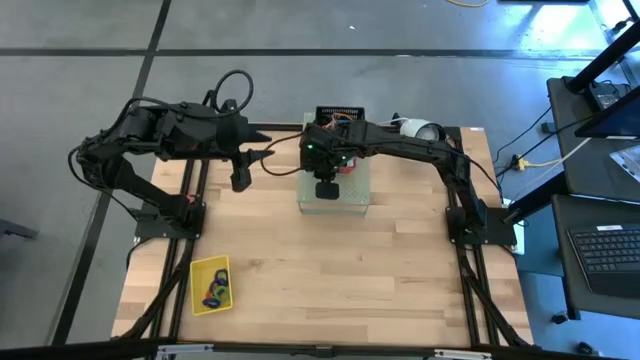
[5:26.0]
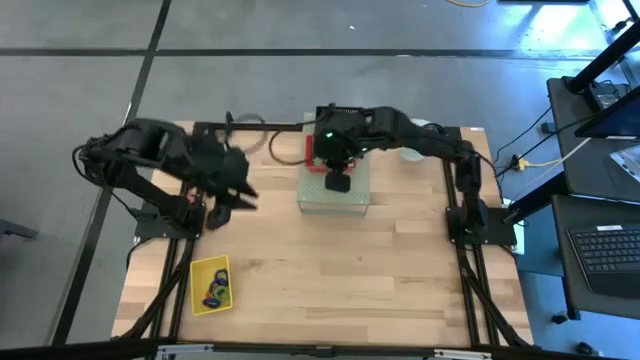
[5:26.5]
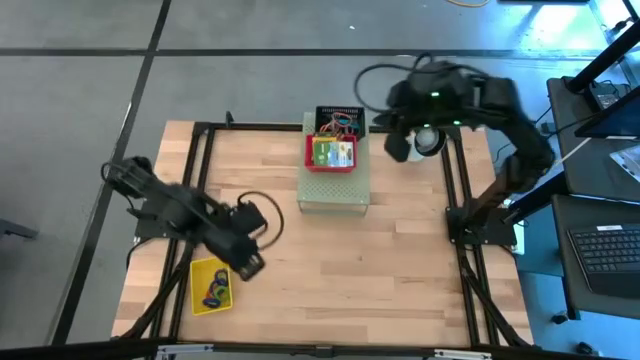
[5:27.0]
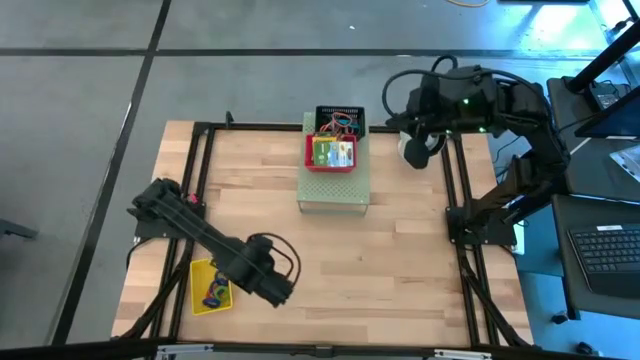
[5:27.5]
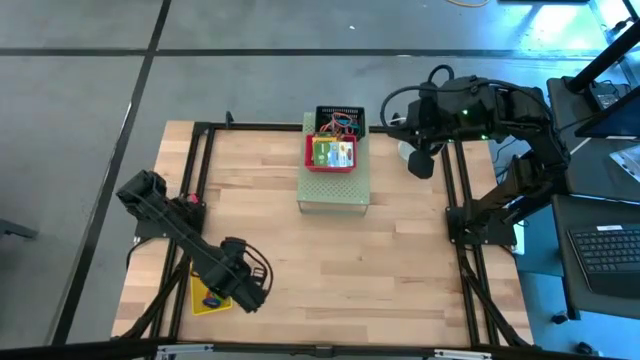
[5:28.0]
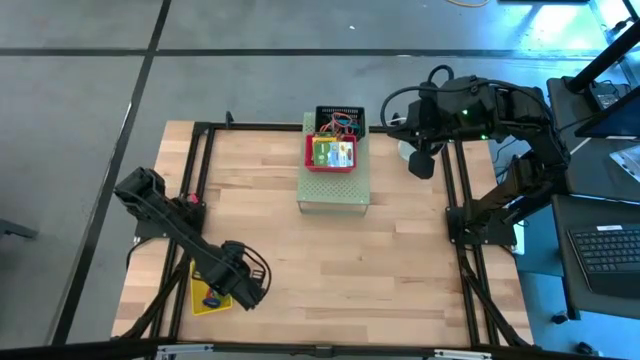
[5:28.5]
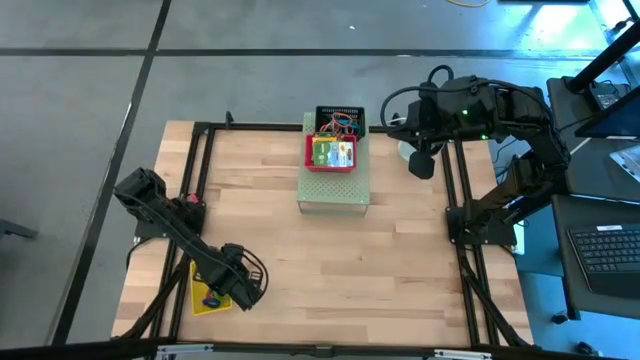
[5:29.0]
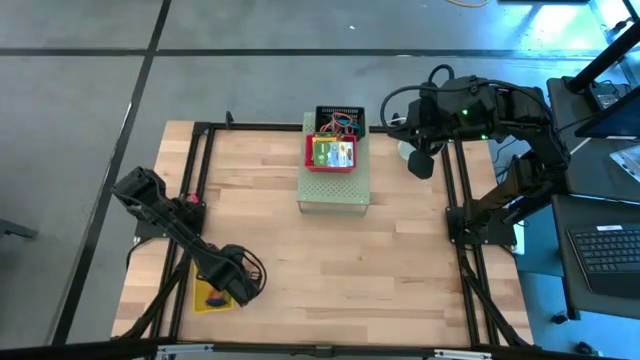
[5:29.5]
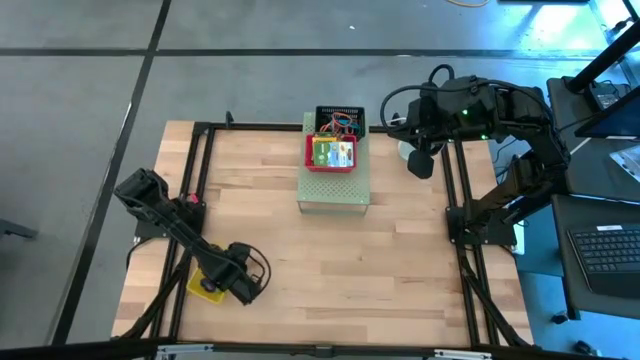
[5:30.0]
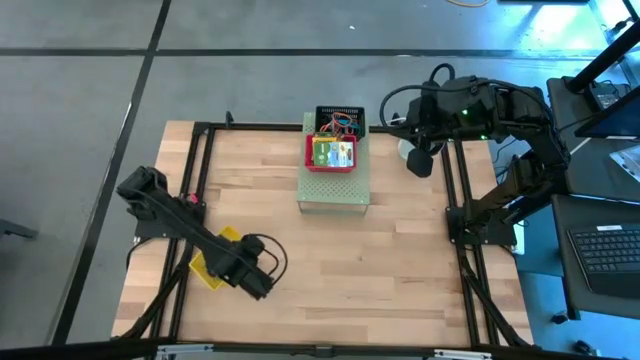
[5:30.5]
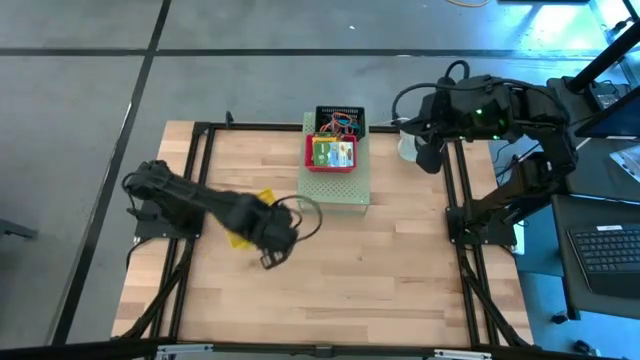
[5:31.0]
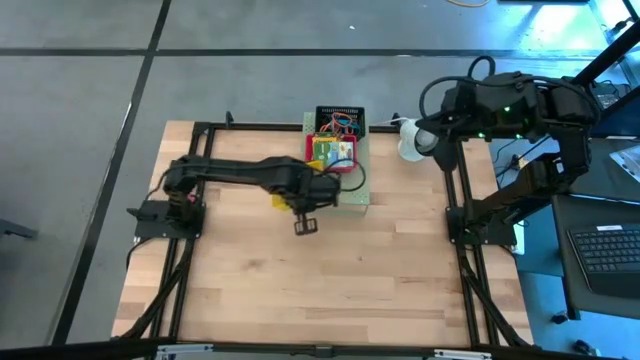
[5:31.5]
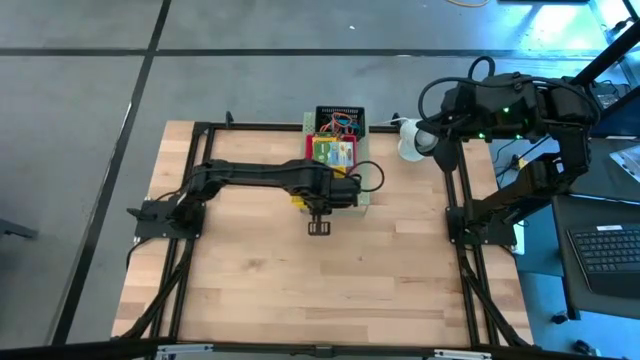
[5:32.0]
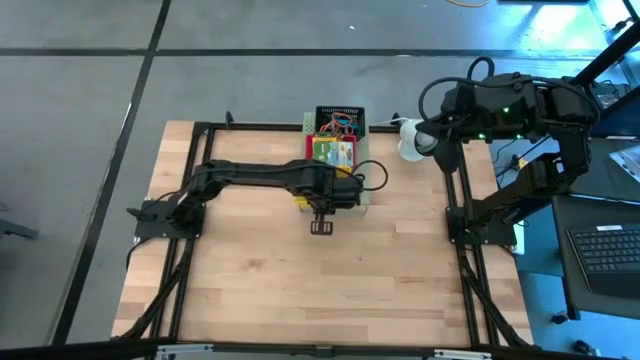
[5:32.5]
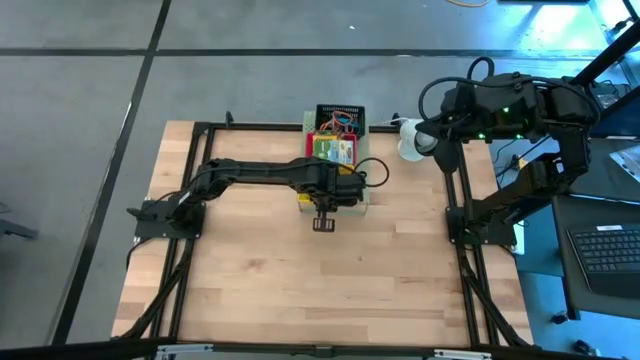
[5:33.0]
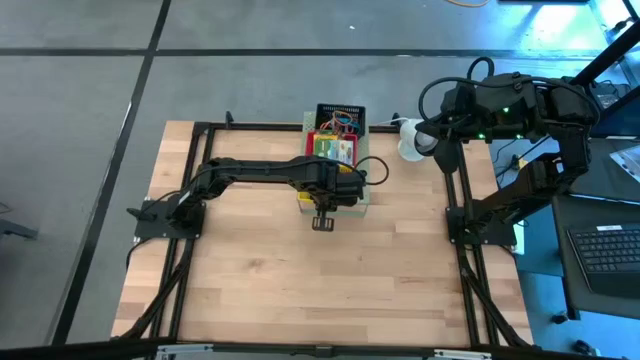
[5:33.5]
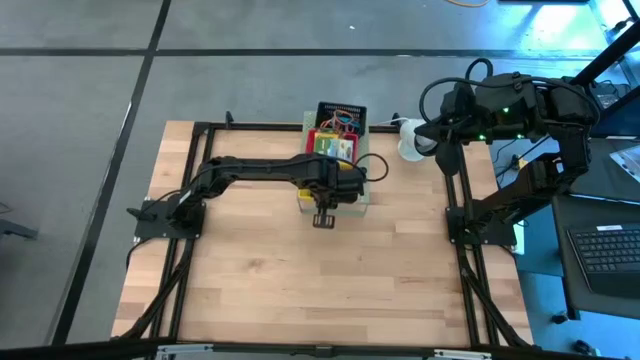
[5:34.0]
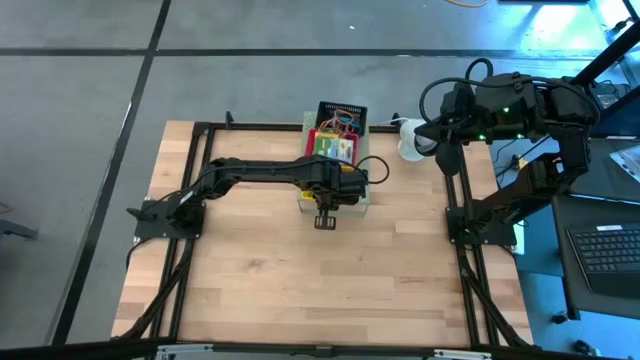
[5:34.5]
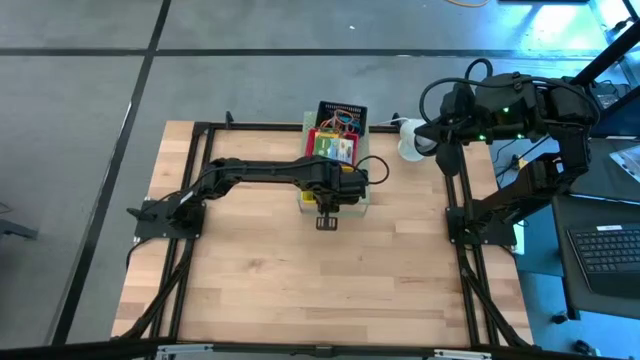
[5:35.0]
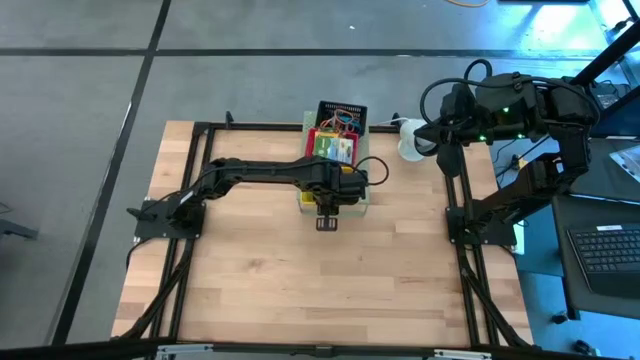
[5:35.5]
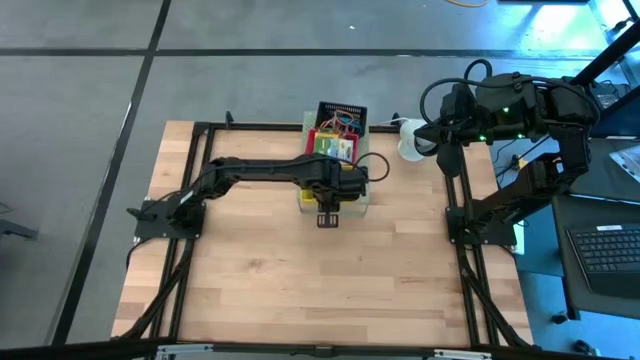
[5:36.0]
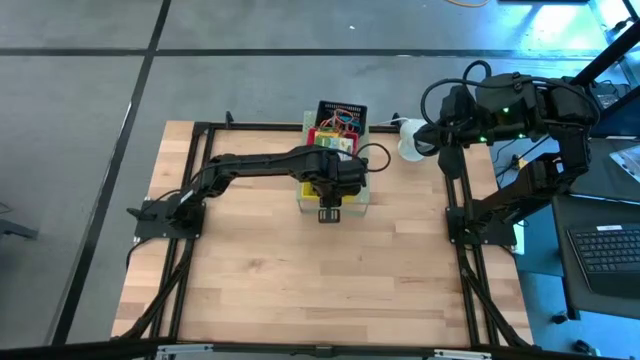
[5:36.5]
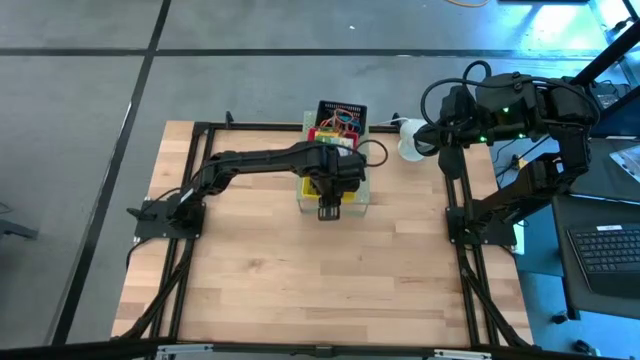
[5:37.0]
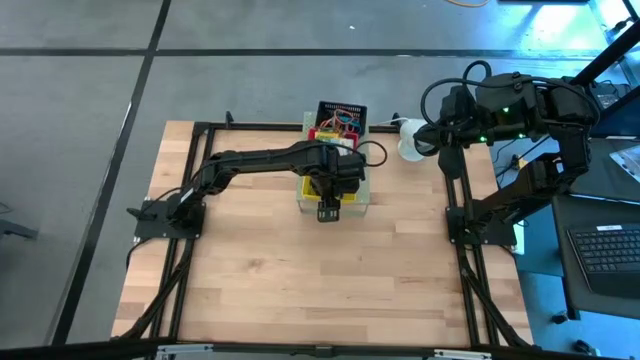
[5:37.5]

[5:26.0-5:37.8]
Task: Pick & Place Office Desk Supplies
Put the yellow bin on the shelf

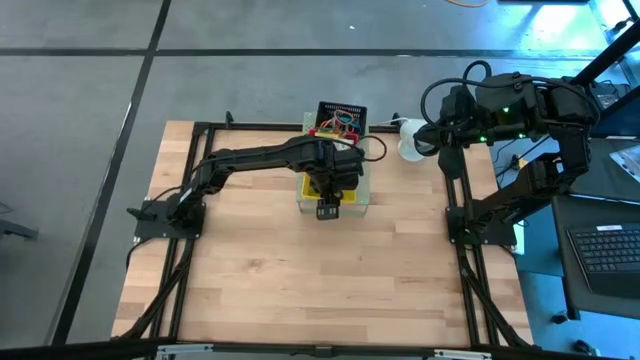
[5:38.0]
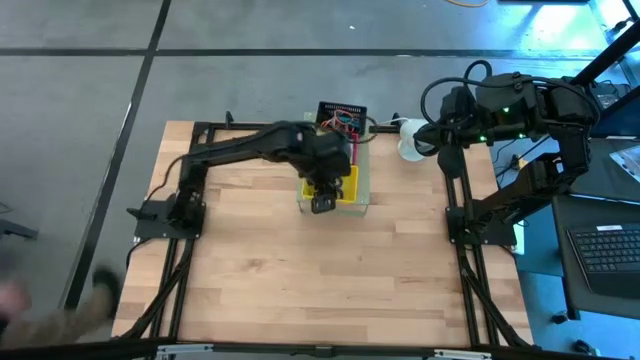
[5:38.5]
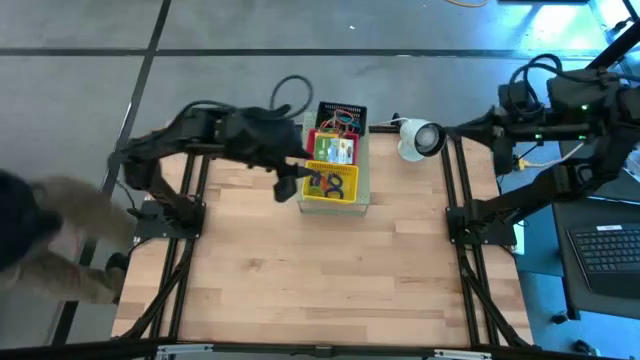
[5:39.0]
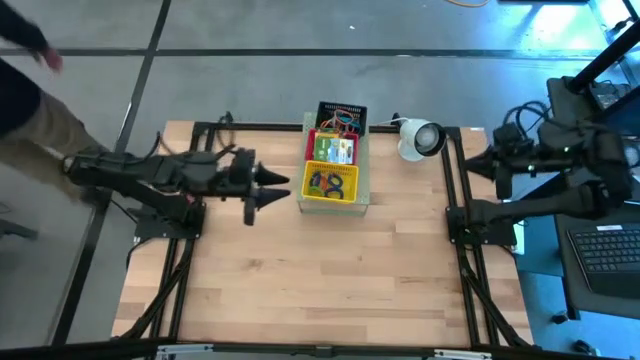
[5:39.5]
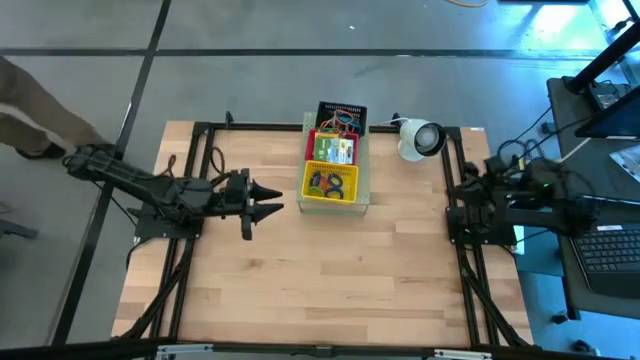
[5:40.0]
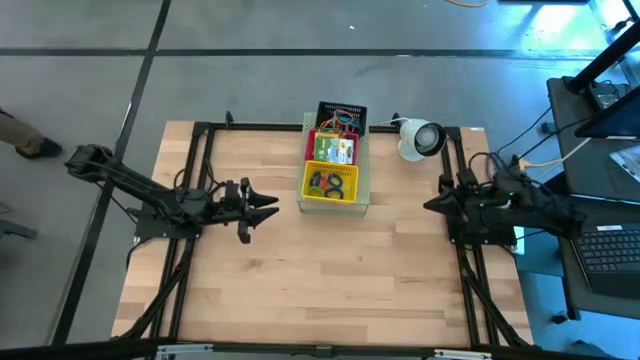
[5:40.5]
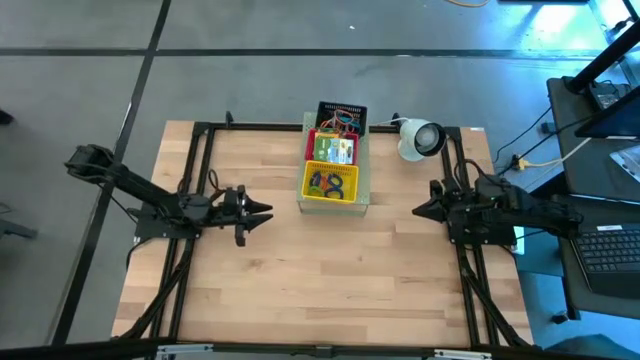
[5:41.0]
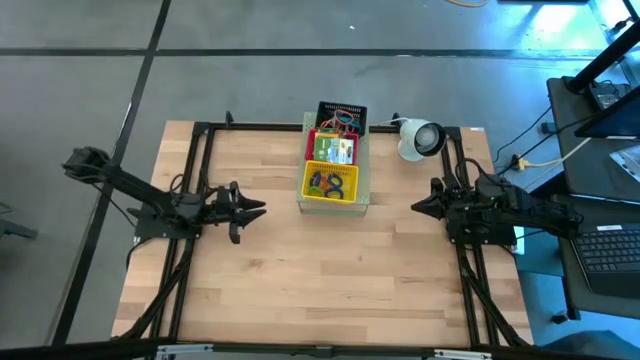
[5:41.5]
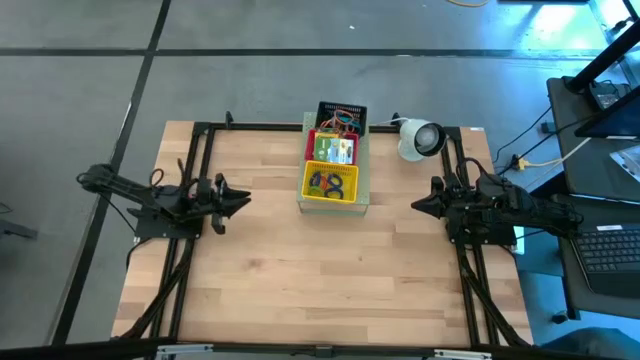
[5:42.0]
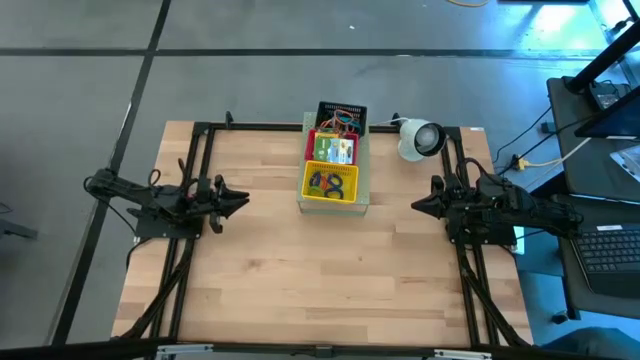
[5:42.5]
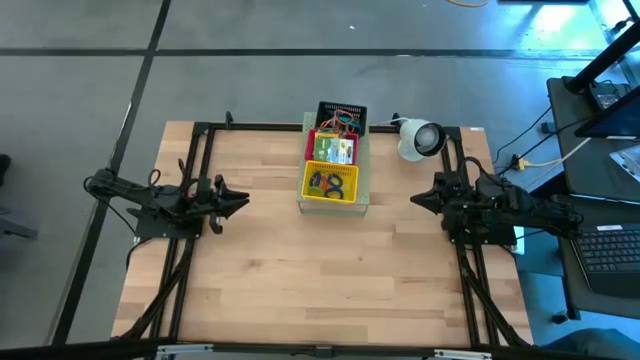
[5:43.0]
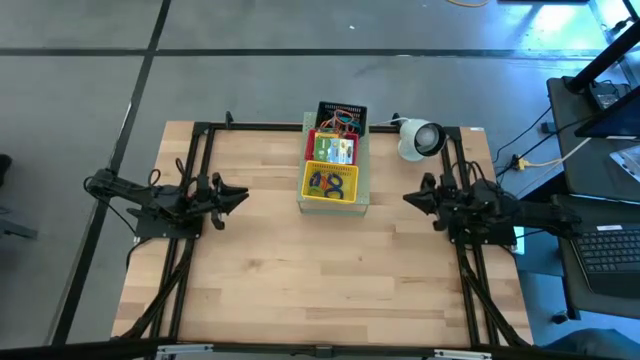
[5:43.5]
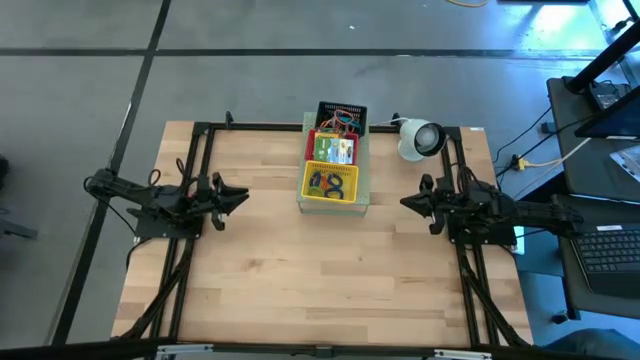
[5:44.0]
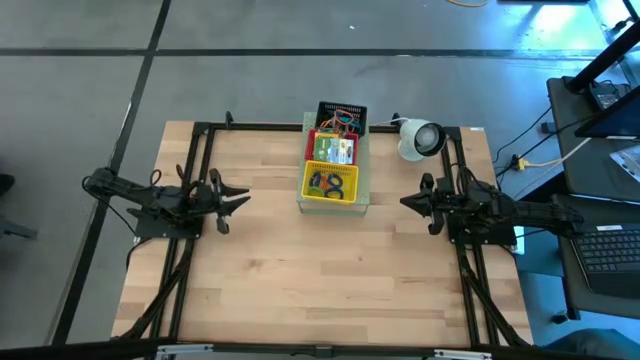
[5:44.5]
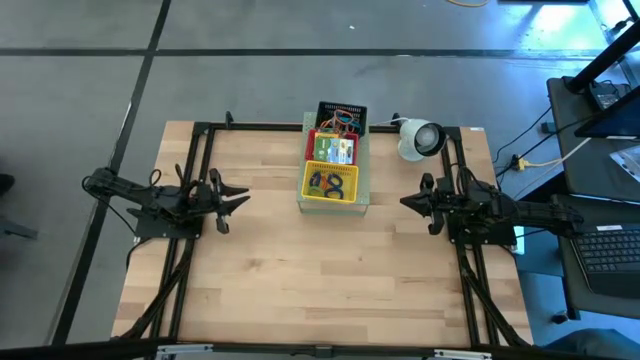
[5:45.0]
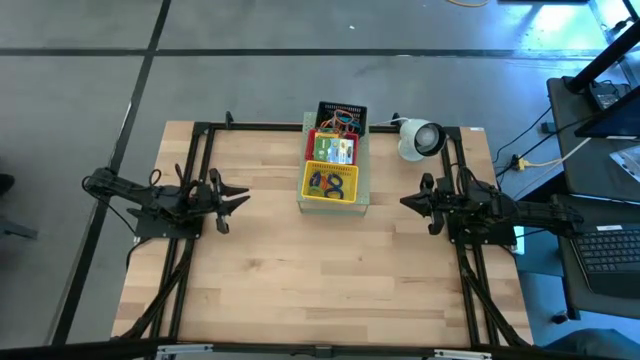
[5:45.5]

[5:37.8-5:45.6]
Return to Home Position
